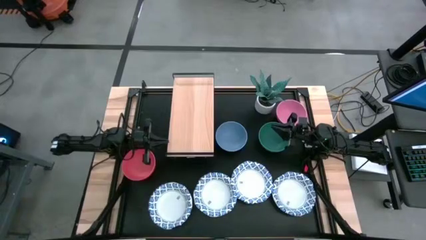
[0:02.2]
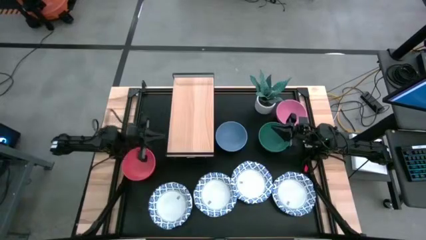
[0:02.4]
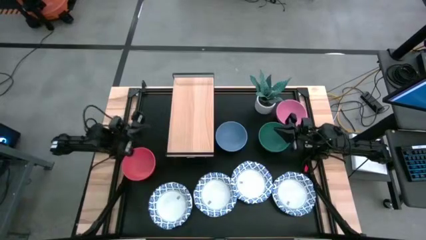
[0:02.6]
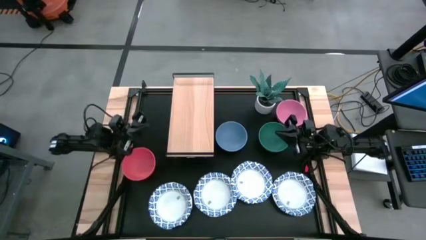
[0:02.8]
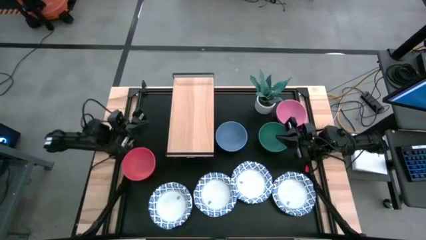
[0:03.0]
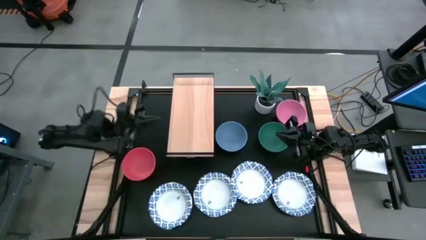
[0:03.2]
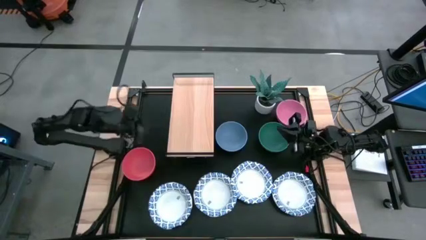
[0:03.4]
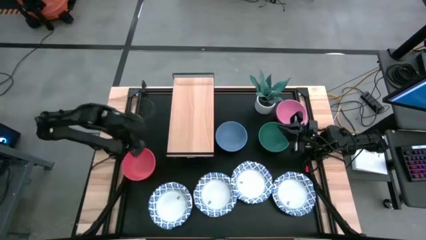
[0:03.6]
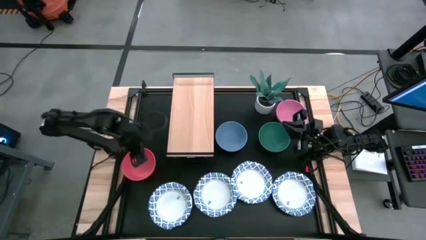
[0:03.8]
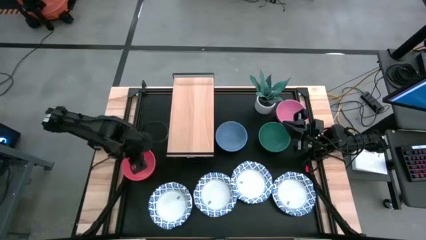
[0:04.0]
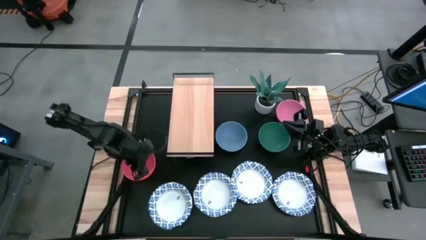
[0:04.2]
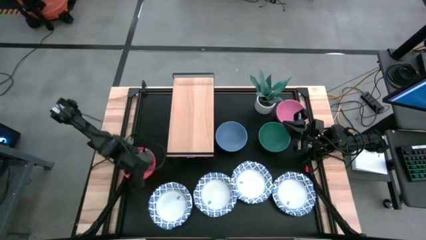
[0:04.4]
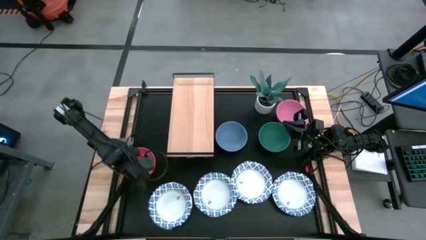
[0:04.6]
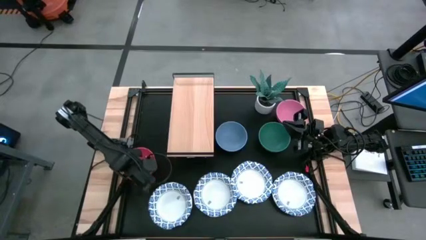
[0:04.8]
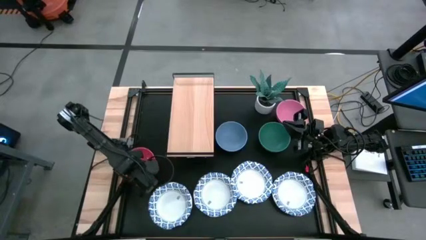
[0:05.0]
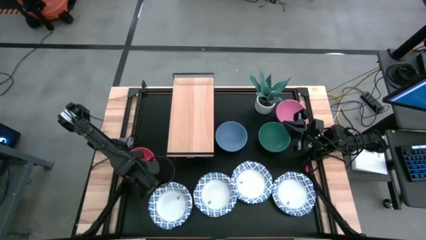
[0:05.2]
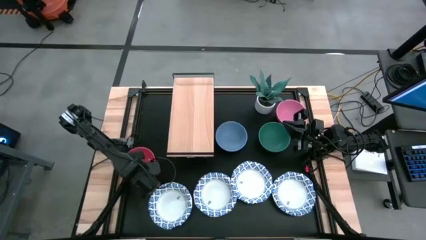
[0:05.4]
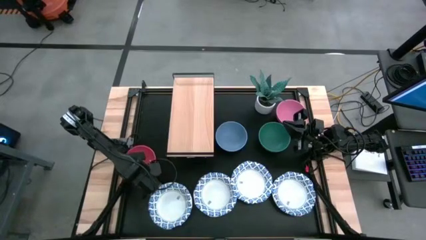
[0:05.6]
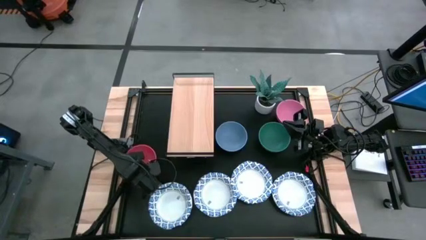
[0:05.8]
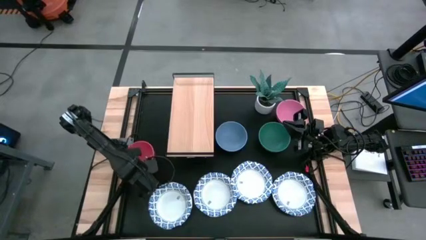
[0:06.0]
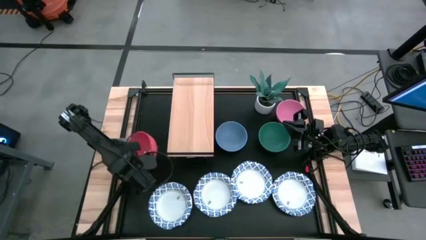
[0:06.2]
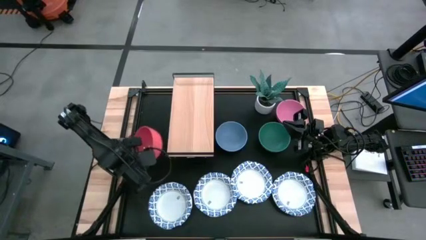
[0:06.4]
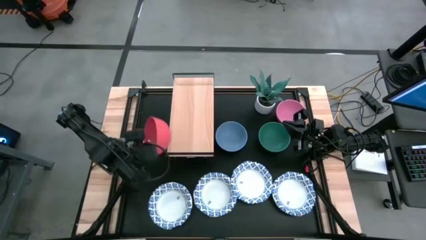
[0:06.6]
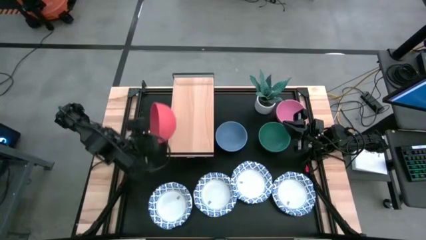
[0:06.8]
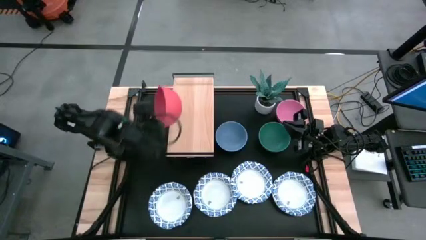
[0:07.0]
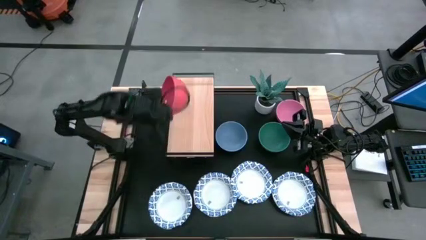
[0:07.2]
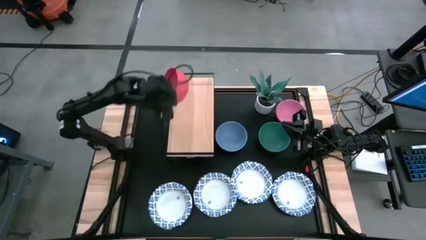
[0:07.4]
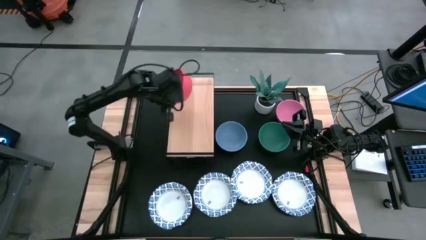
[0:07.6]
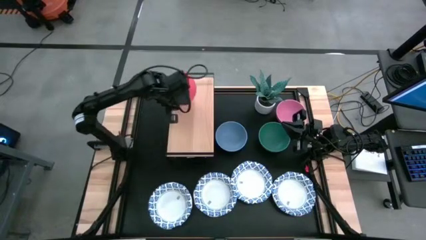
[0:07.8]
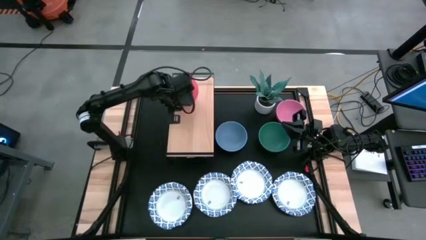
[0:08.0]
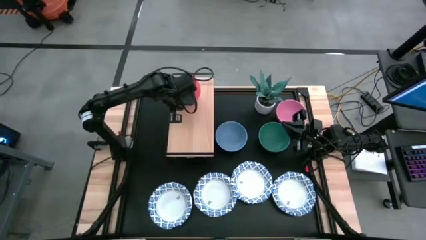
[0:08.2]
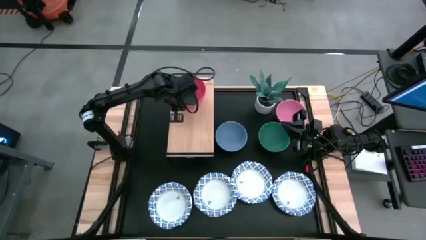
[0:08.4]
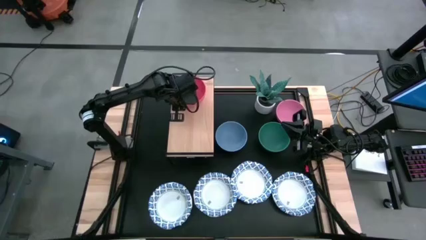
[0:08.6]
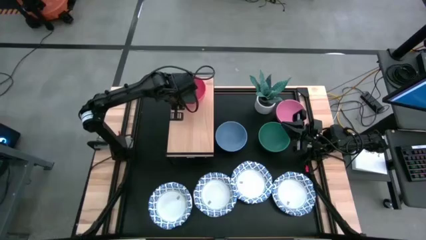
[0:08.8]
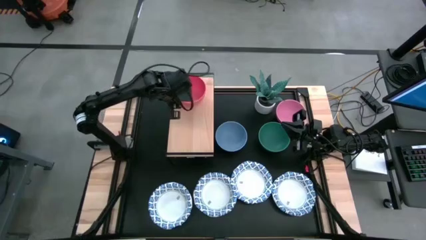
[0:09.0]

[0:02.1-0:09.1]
Task: Place and stack bowls onto a shelf
Put the orange bowl on the shelf

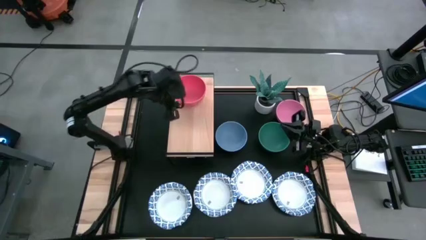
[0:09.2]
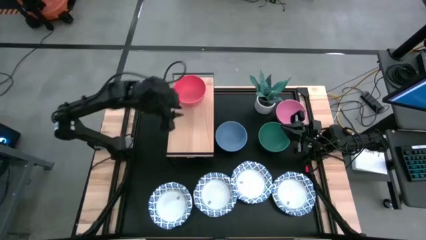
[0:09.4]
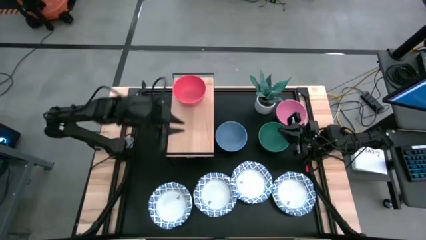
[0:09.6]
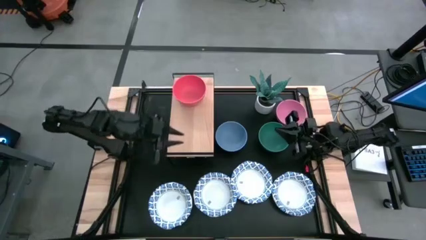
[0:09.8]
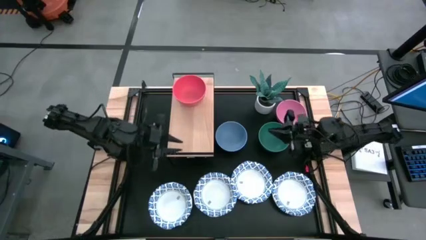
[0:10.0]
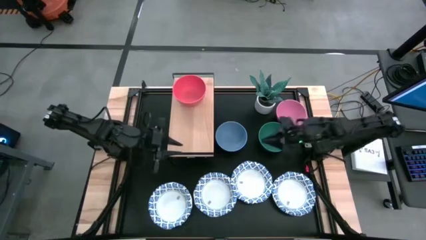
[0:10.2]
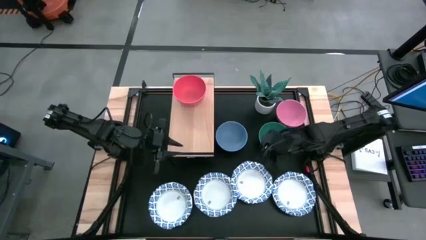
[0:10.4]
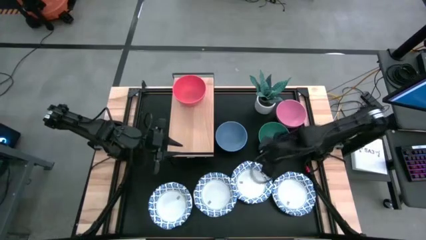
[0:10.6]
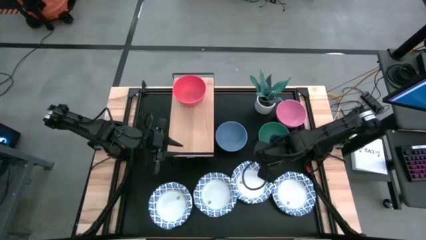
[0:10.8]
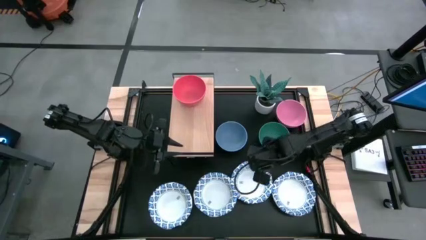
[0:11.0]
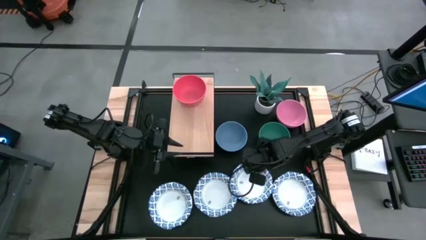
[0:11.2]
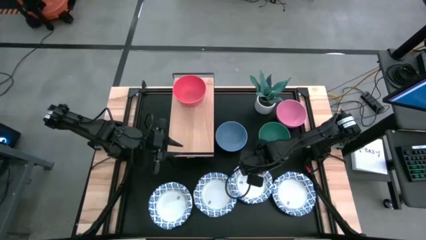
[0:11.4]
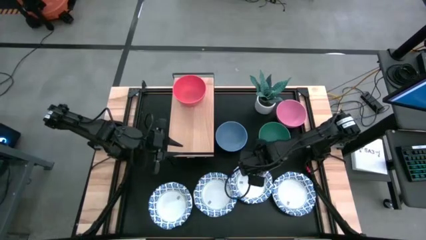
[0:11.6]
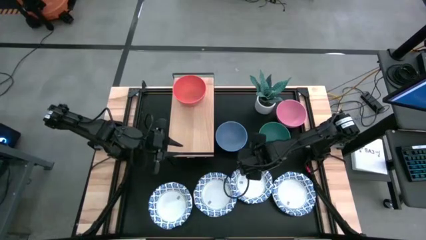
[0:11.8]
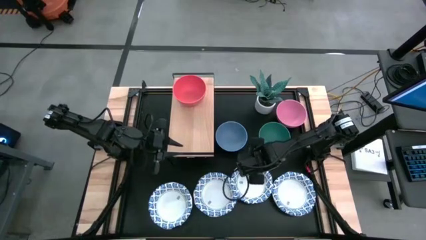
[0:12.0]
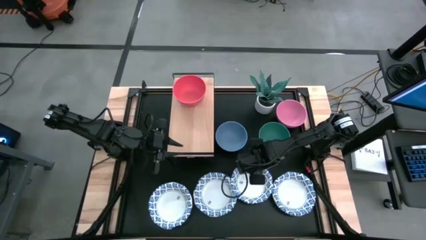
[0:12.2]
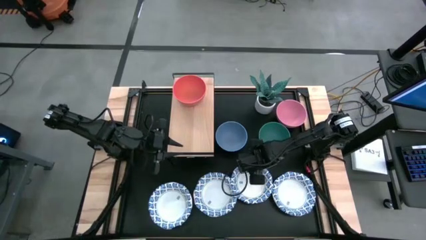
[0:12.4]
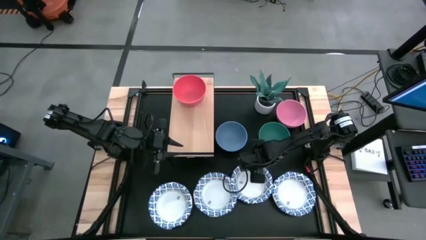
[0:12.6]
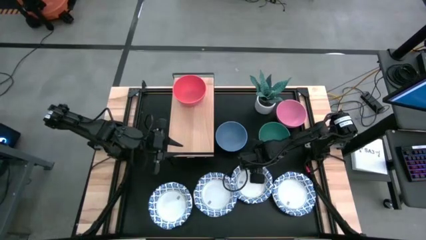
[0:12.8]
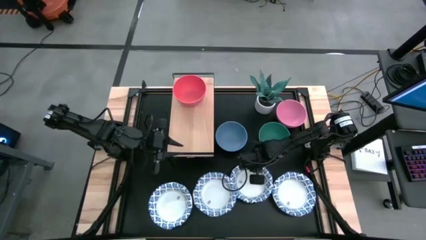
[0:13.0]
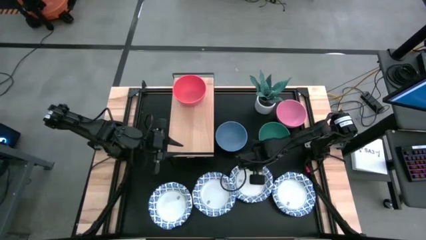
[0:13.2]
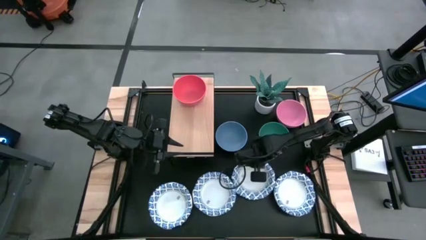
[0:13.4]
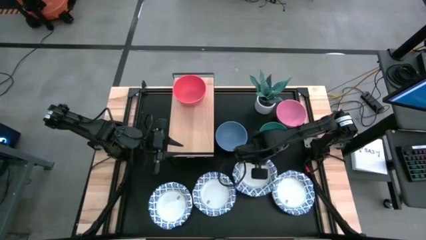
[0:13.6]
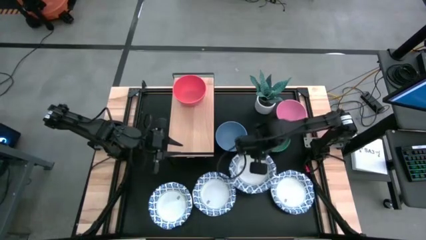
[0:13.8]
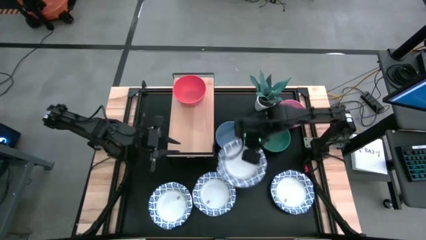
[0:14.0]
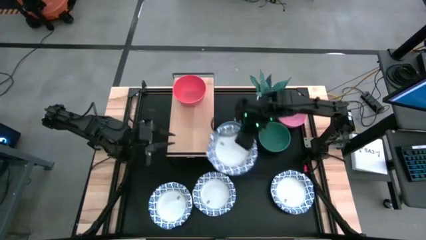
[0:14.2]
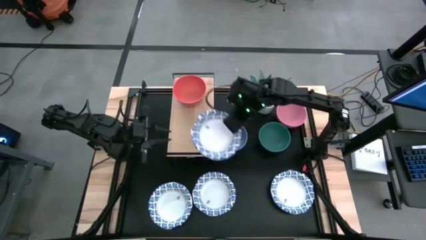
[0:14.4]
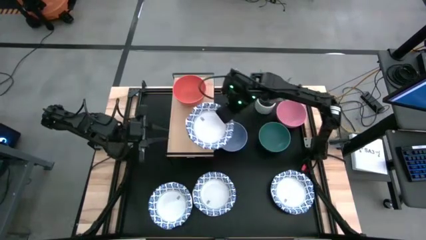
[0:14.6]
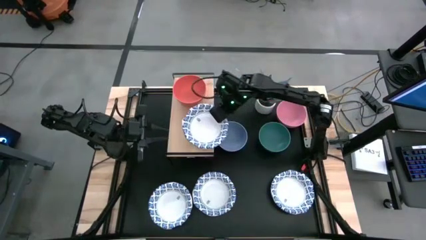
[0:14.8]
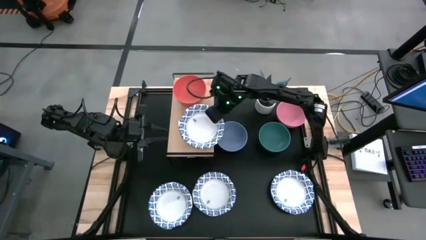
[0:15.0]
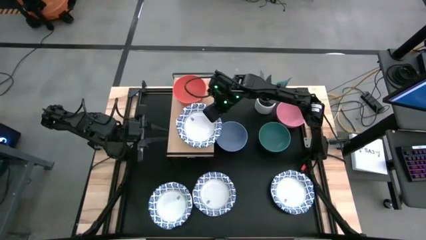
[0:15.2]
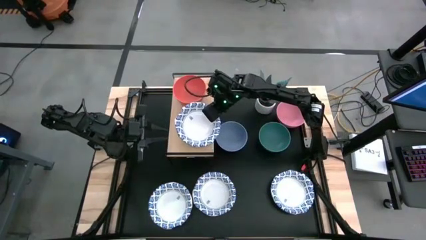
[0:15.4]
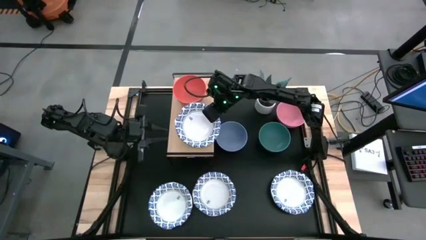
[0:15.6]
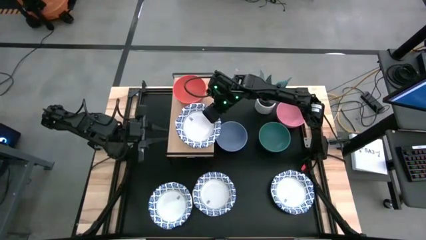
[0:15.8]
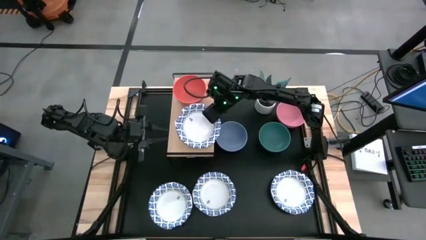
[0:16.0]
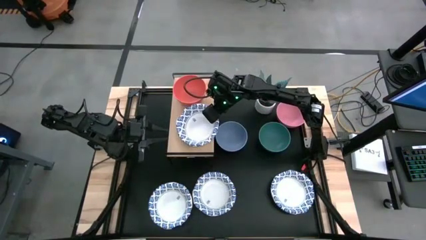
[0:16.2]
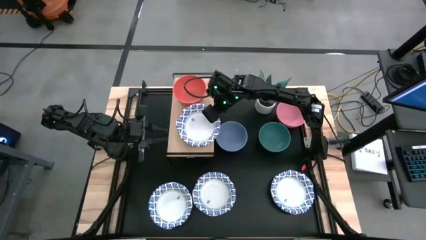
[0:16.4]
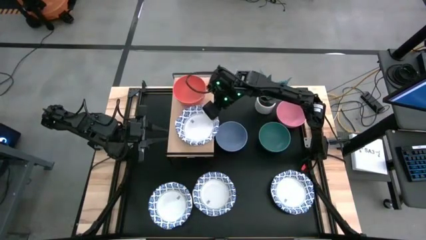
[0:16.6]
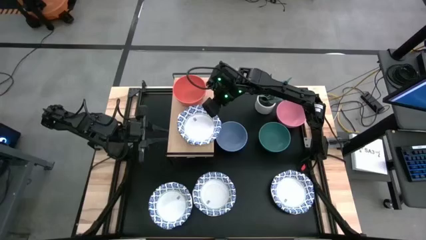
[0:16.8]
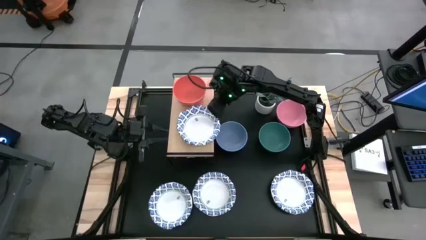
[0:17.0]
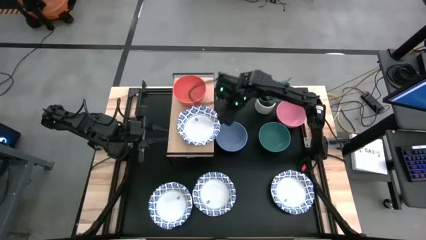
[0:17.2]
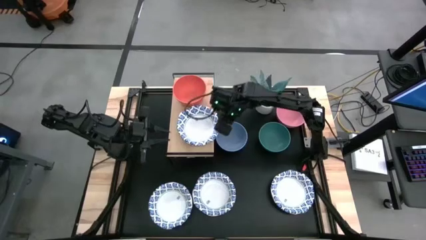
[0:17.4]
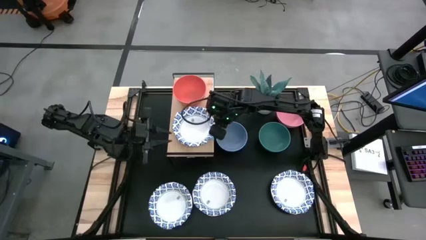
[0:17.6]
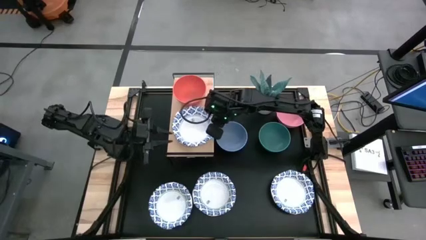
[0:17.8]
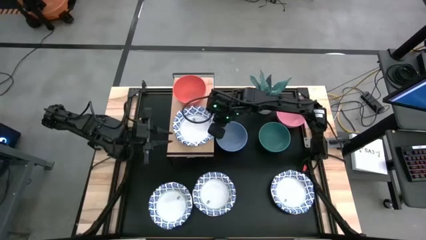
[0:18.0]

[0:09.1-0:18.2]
Put the white patterned bowl on the shelf
